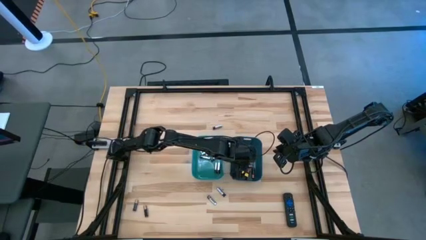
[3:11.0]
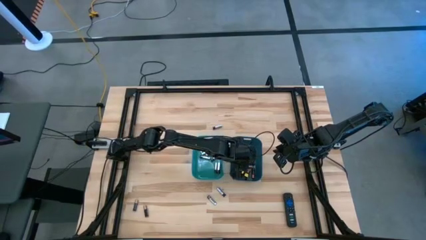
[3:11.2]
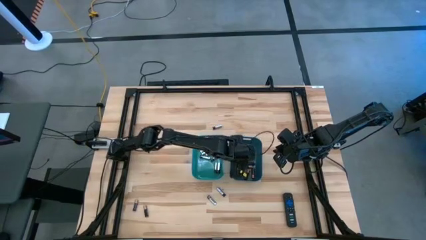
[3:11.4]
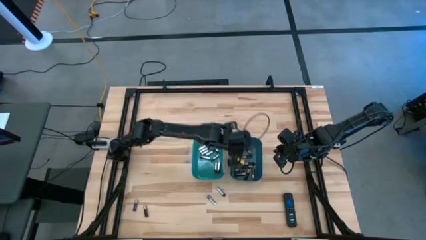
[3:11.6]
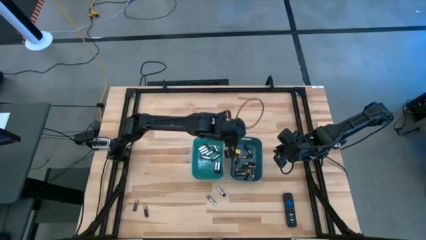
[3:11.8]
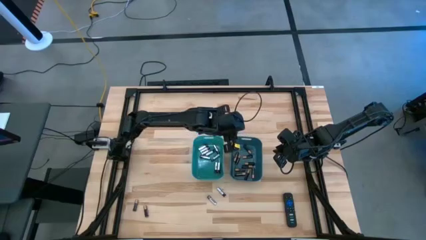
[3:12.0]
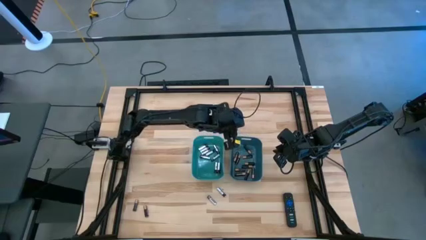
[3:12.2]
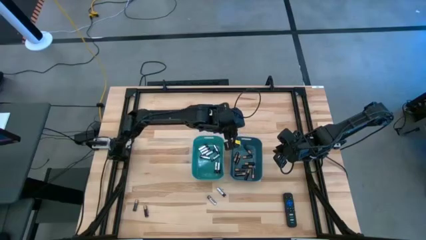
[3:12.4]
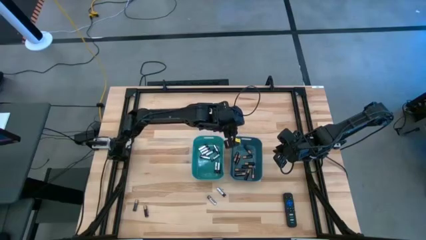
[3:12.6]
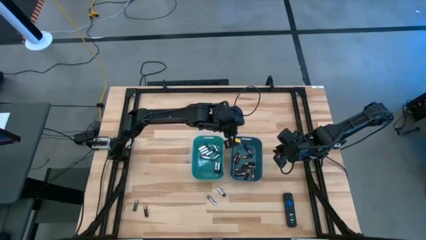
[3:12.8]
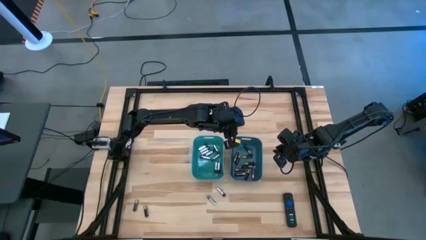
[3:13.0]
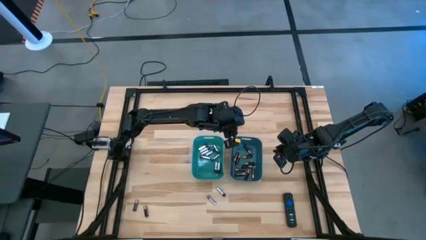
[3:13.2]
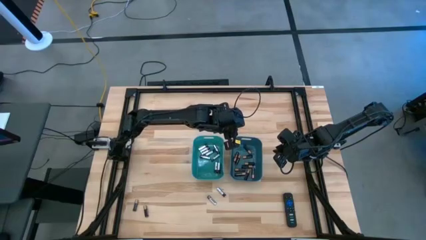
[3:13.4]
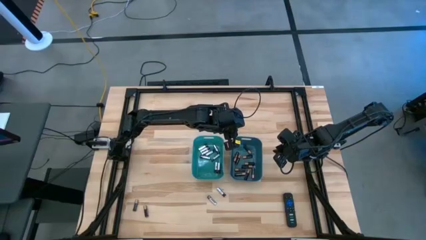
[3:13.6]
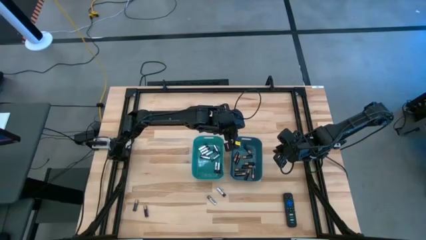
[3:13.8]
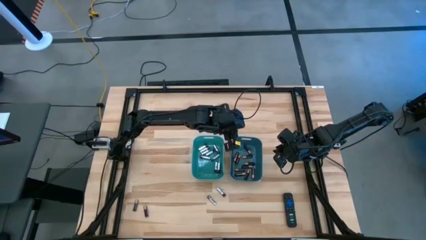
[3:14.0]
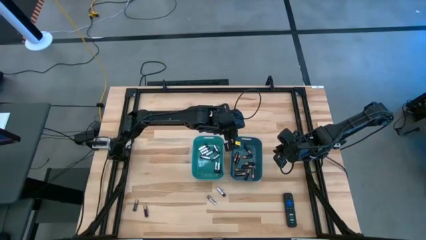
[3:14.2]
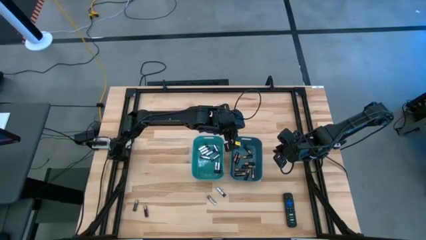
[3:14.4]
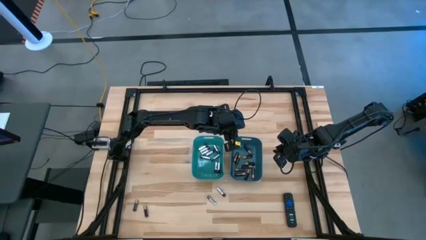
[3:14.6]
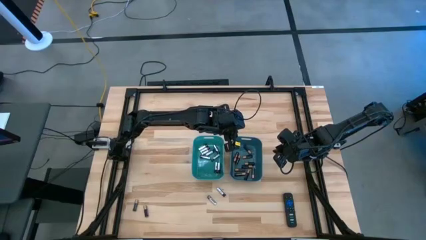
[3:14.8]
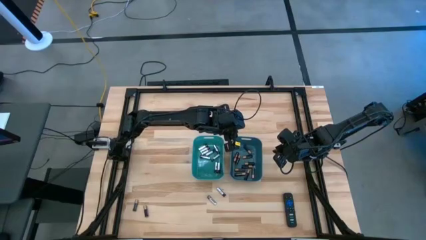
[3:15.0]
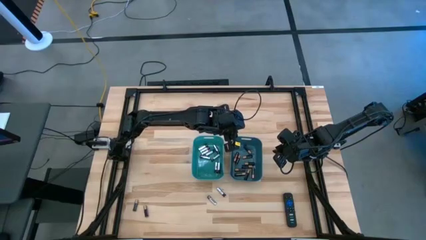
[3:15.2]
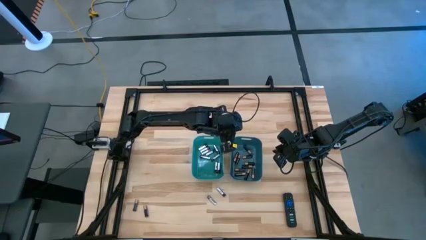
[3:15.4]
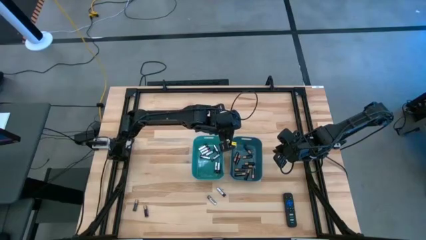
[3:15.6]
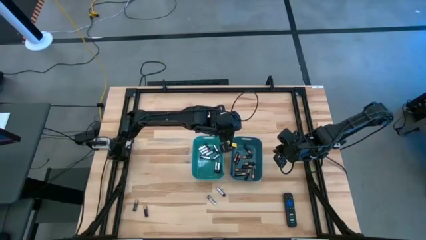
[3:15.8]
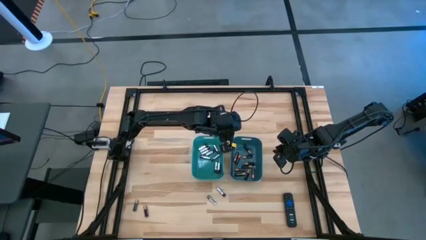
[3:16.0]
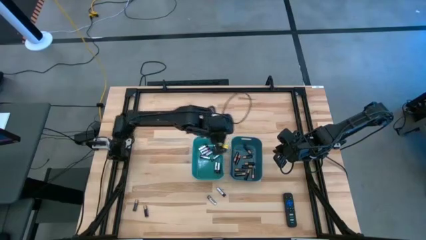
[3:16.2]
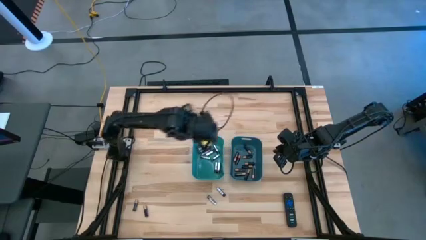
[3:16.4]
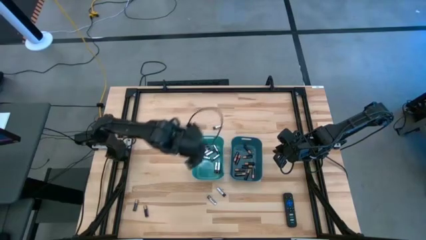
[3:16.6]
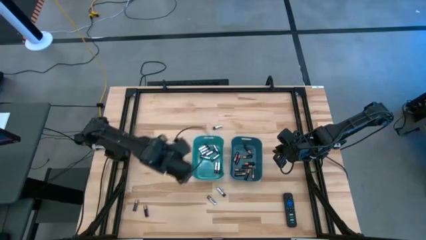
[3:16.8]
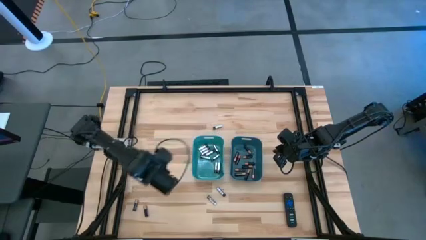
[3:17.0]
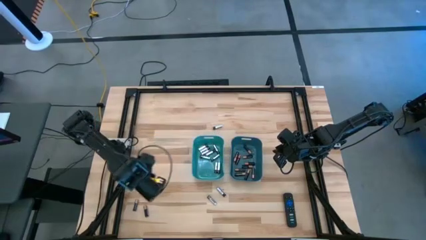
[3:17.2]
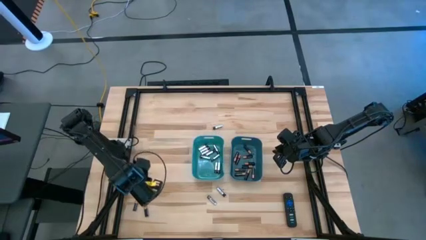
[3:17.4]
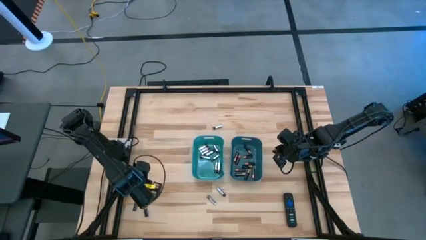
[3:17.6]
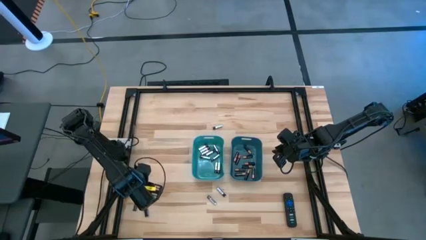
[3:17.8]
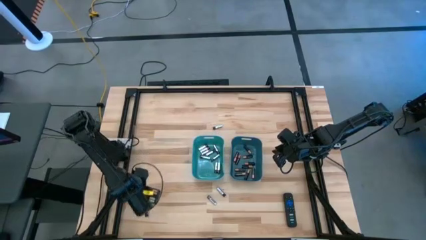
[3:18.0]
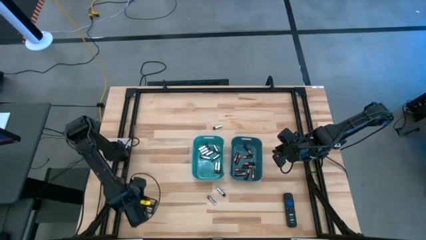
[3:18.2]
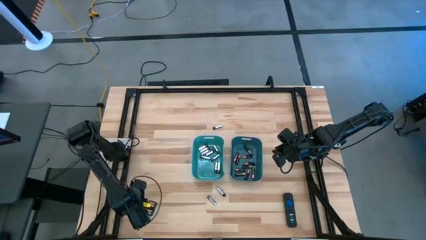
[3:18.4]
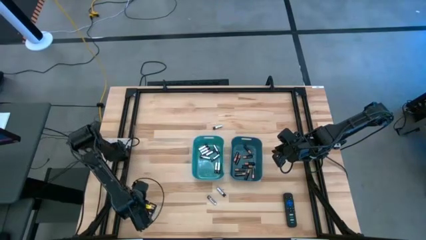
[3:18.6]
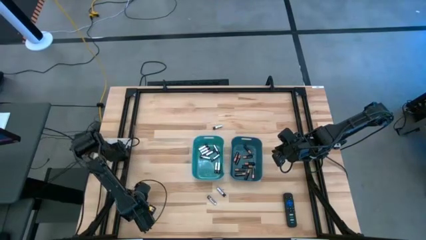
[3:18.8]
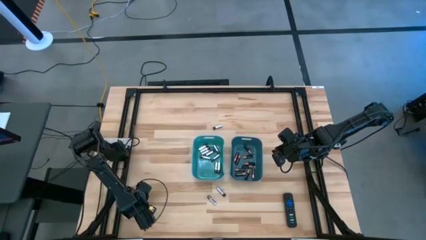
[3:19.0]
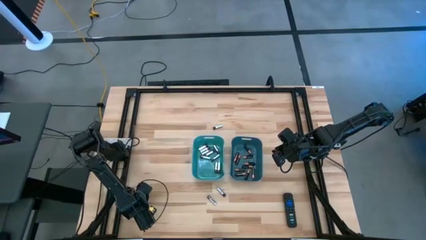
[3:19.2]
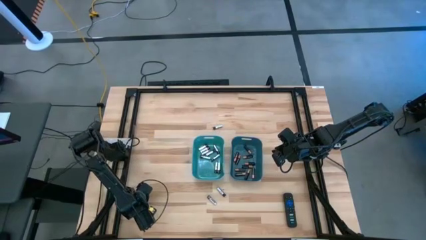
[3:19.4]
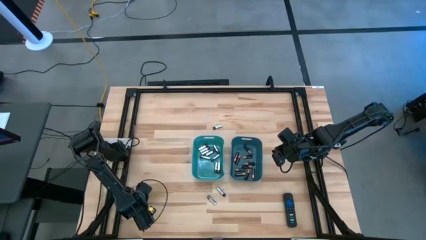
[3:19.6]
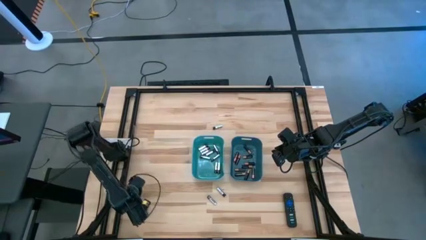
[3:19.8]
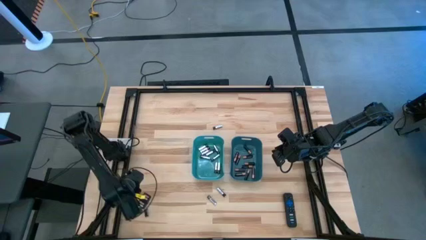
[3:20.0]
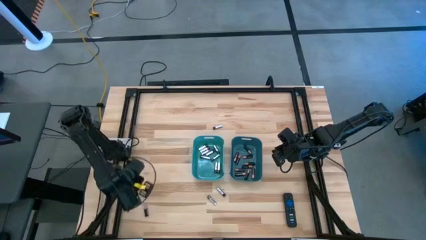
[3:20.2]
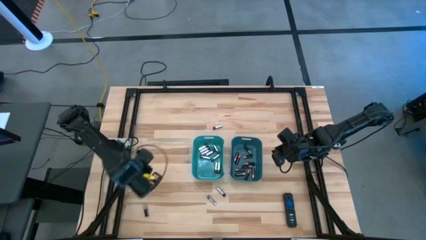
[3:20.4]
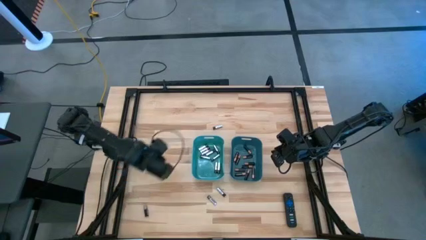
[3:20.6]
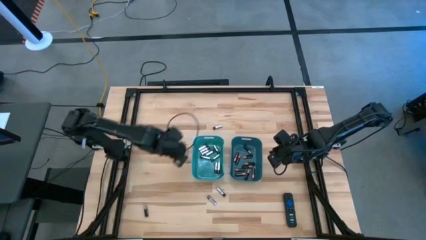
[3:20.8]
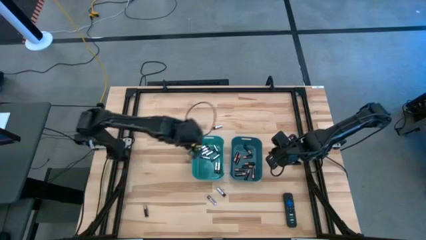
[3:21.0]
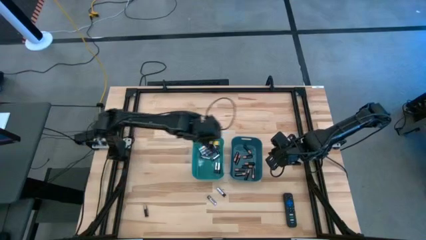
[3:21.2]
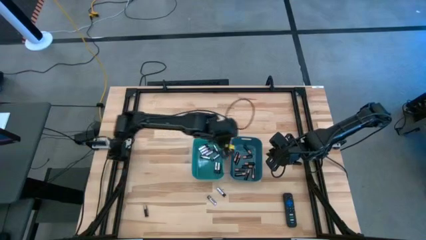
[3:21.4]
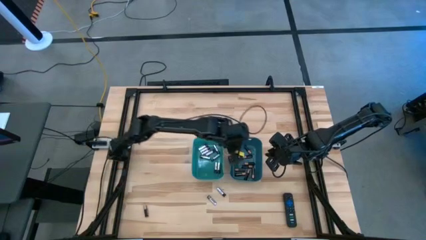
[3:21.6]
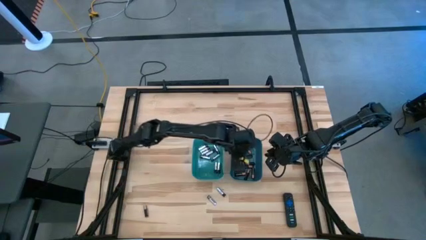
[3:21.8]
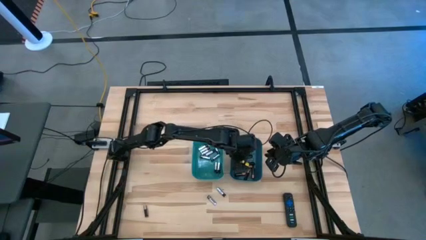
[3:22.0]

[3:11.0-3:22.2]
Task: Sort batteries
Put the black battery into the blue bin
